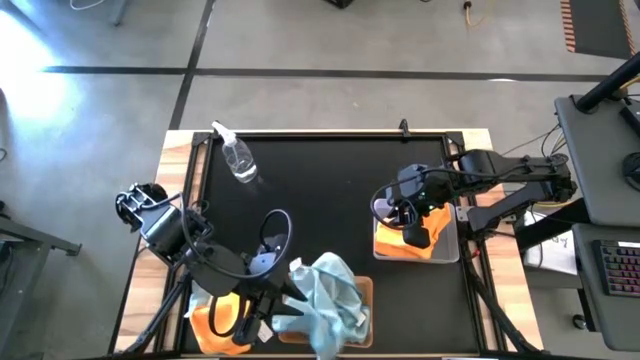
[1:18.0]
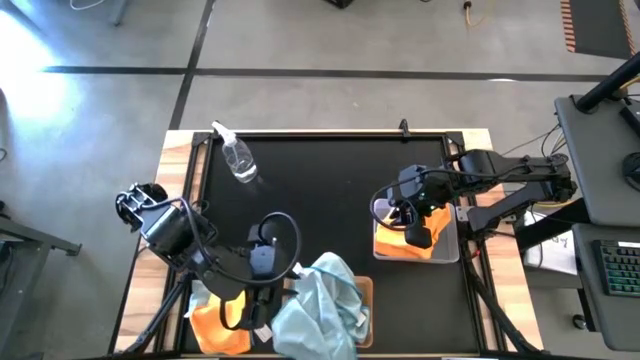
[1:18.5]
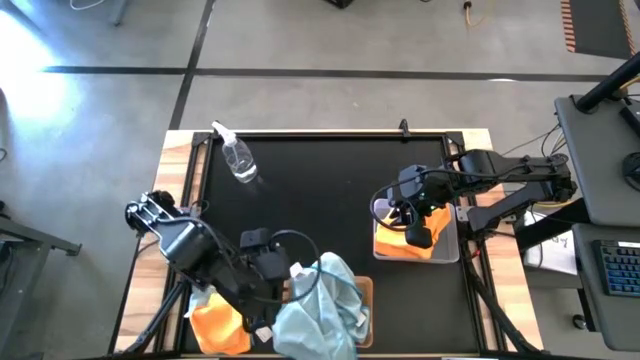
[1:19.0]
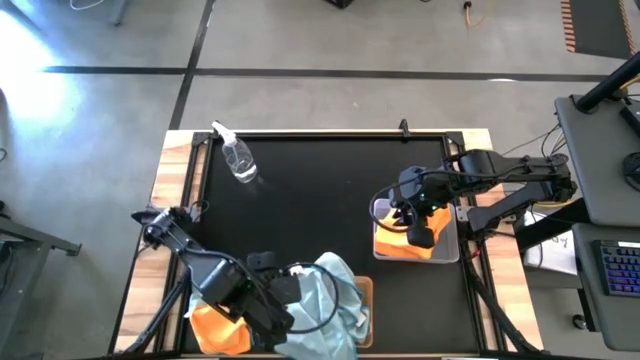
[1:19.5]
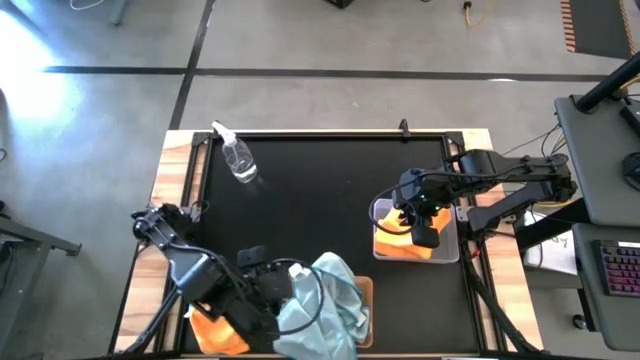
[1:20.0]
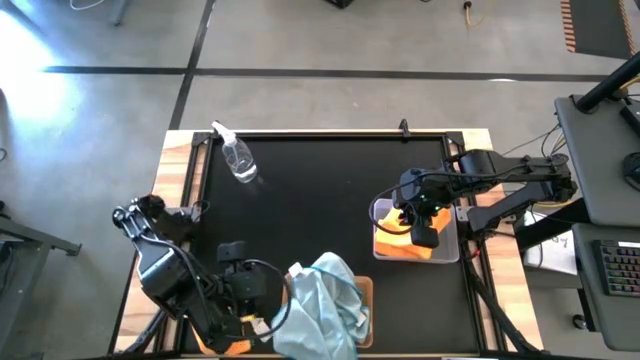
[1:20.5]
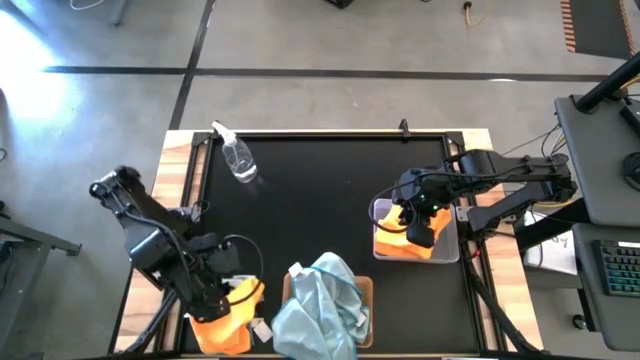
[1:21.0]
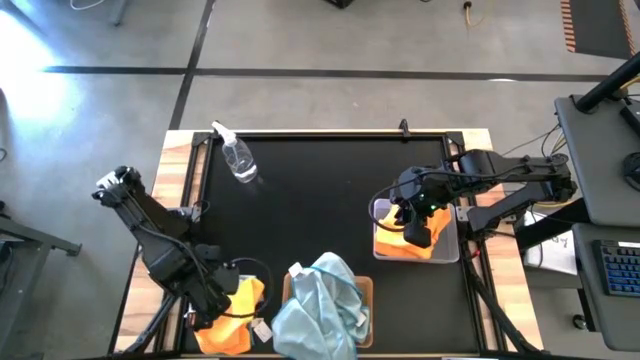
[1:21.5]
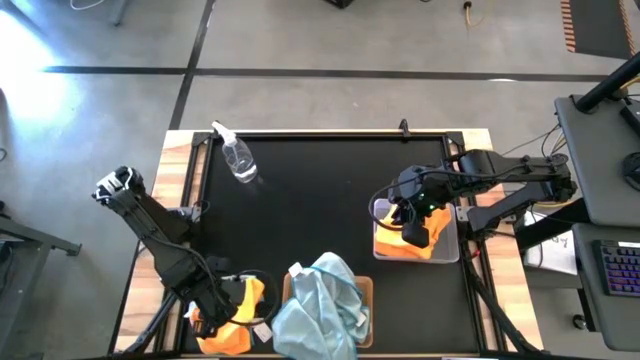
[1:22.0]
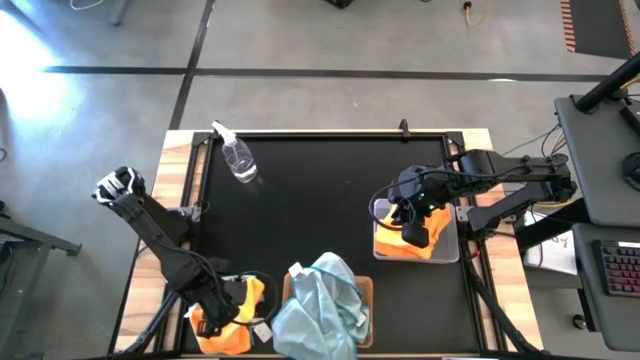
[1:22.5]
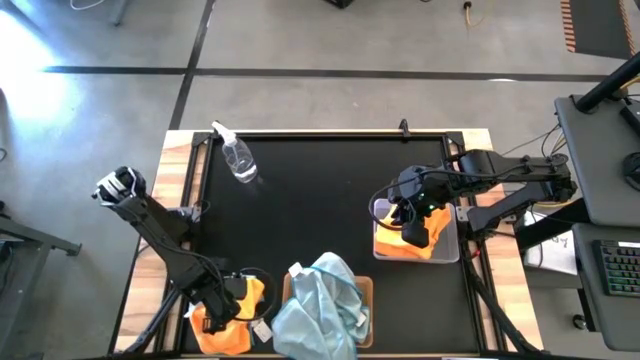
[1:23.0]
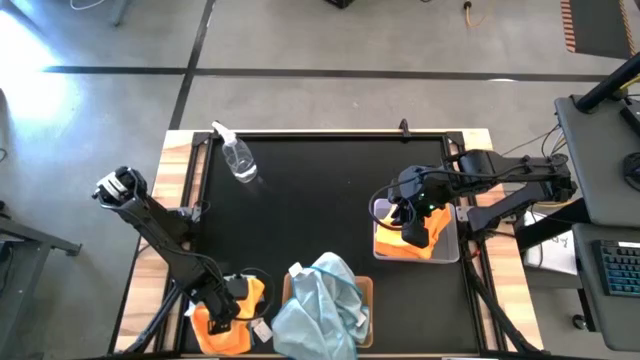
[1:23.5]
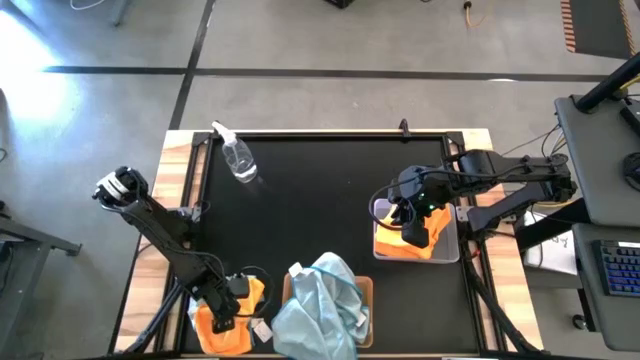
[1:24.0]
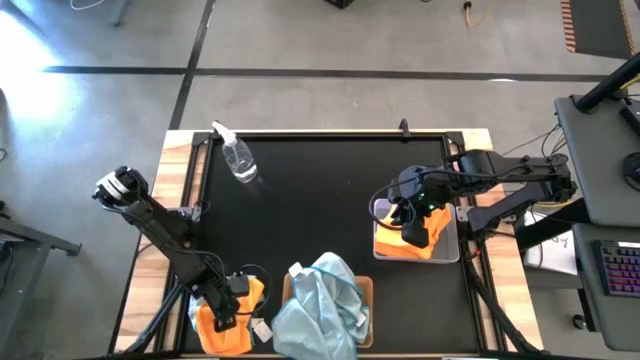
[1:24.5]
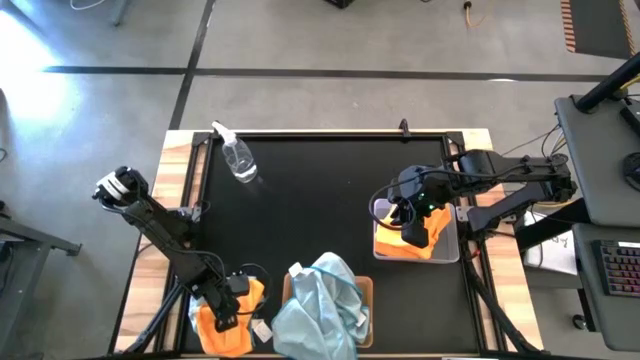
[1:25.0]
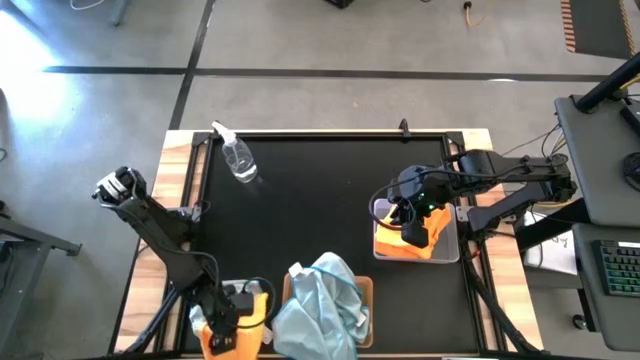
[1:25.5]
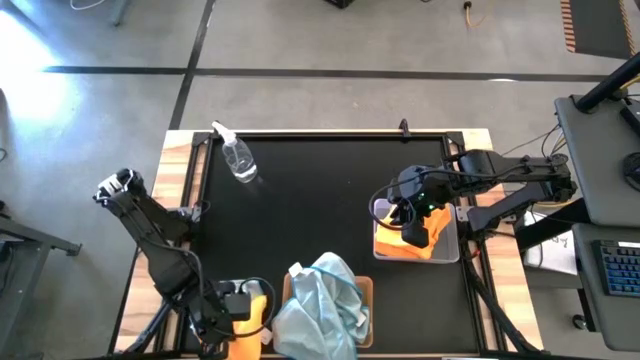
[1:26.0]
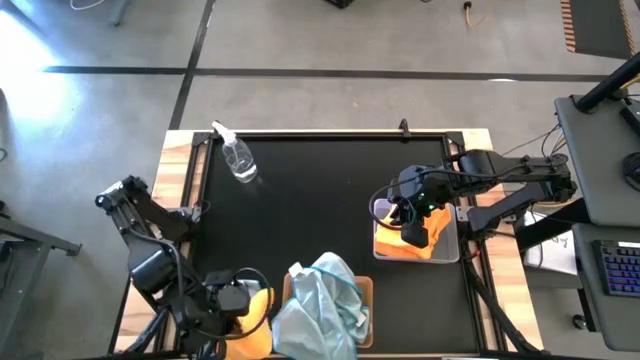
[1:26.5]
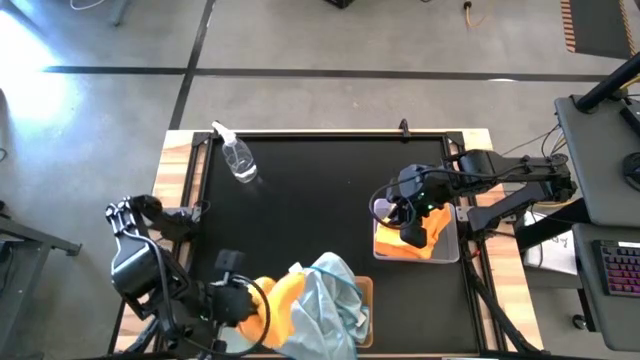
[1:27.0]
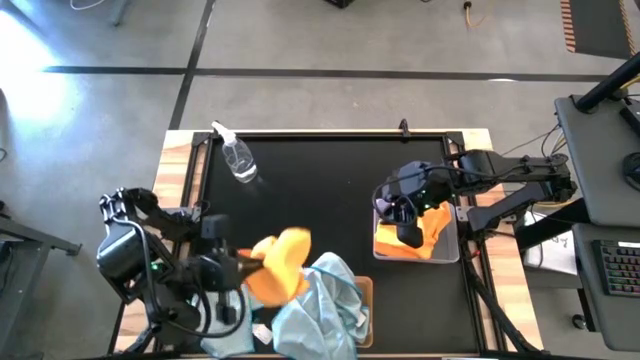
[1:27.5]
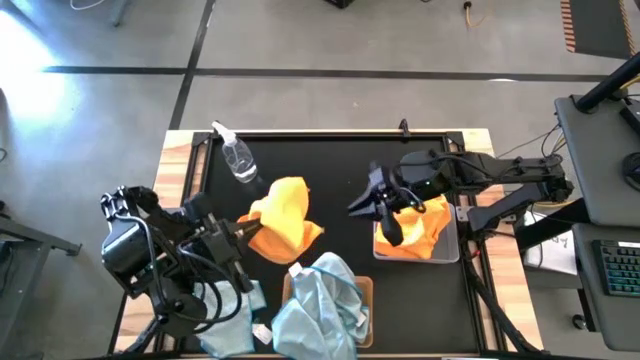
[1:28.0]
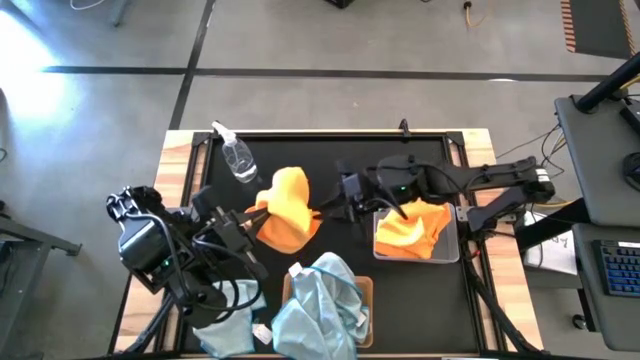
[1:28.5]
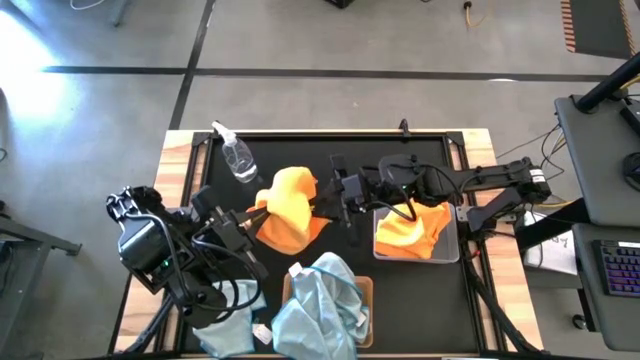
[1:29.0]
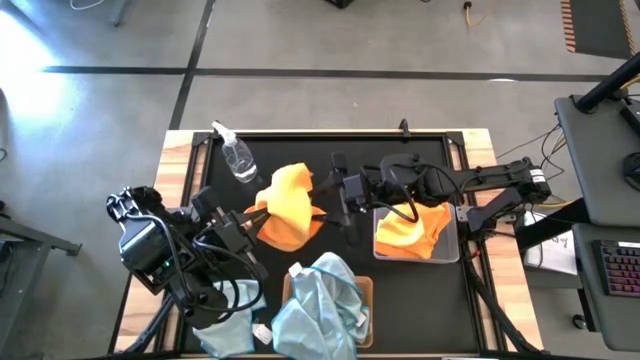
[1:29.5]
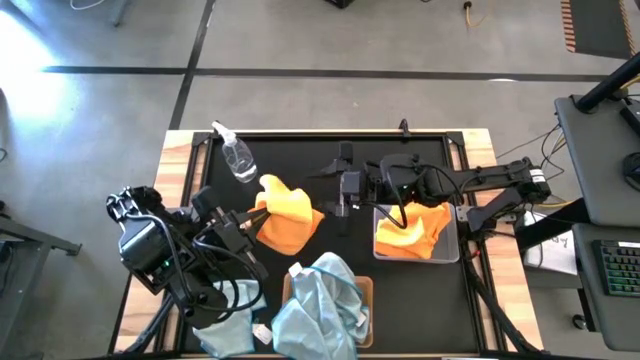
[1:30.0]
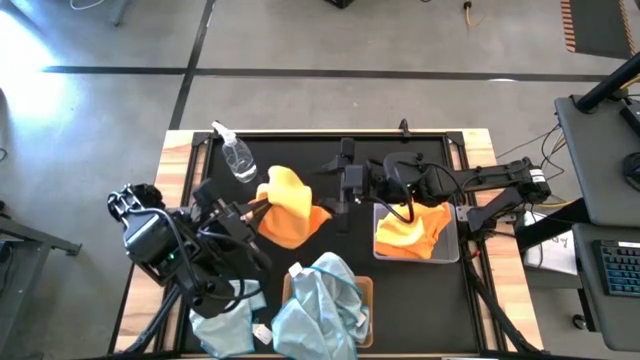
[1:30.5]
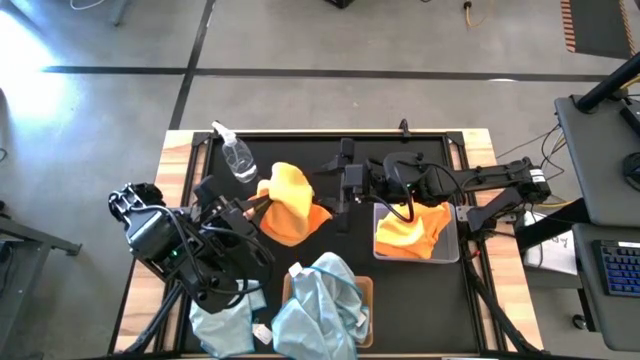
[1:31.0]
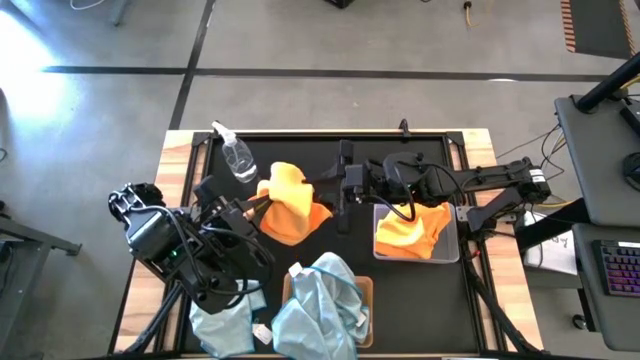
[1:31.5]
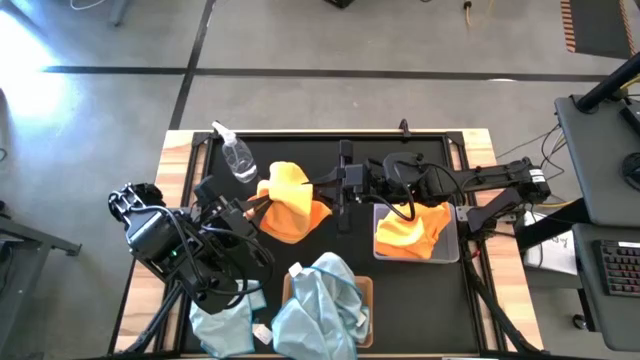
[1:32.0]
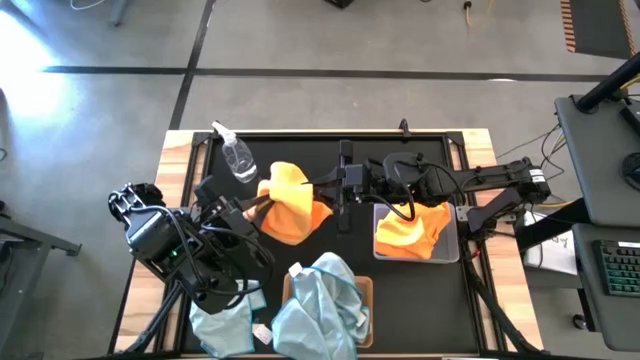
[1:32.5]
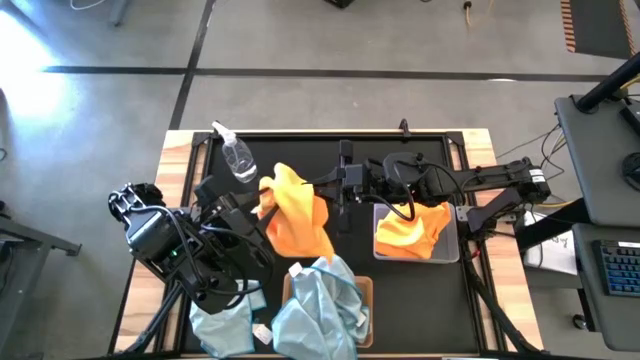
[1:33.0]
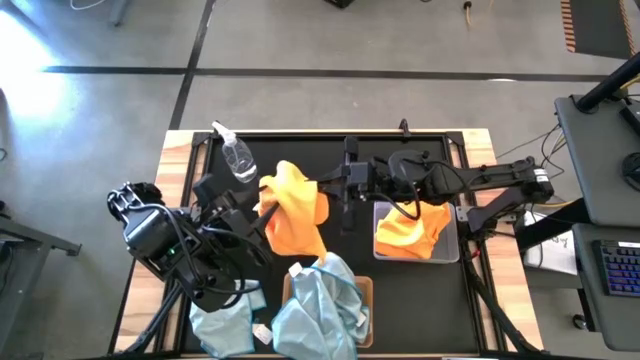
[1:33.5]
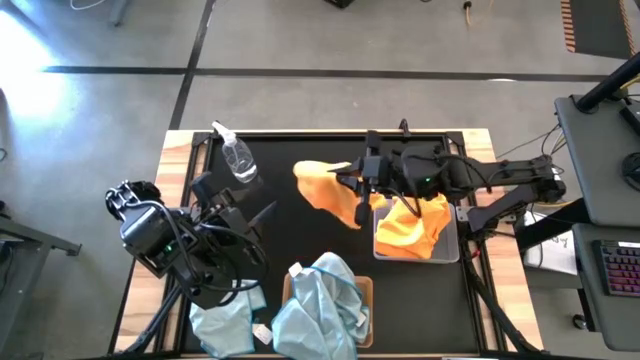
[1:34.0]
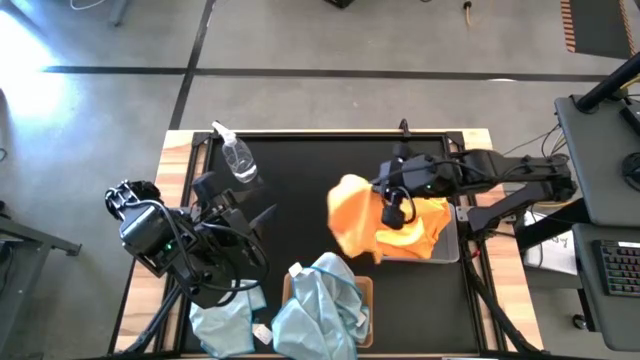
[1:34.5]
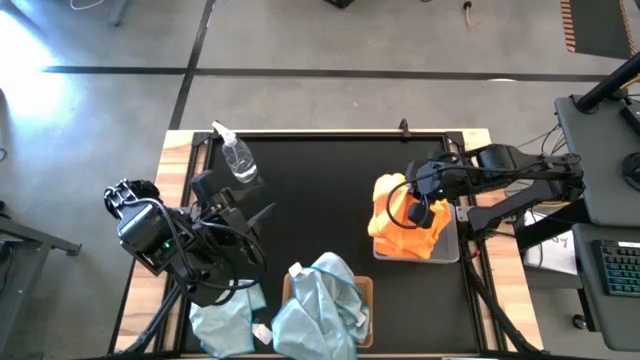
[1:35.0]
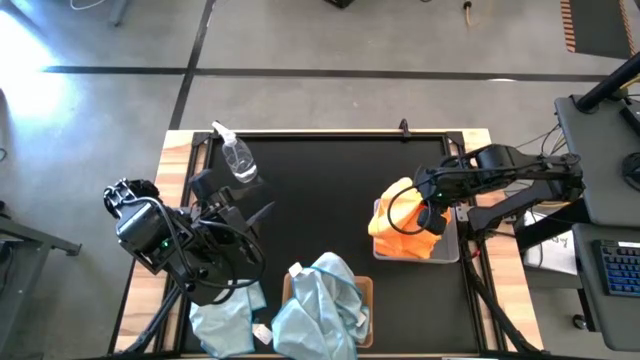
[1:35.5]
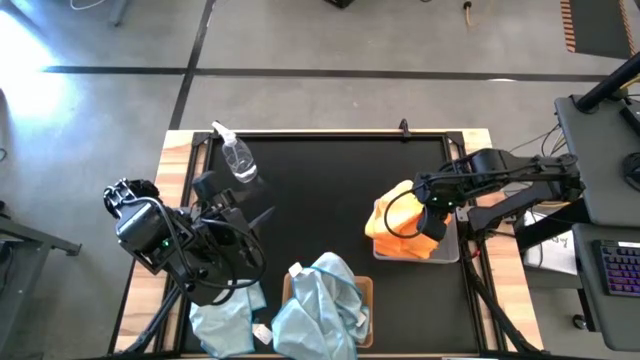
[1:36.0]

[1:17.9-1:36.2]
Task: Sort microfiber towel by color & place in baskets
Put the orange microfiber towel into the transparent bin
